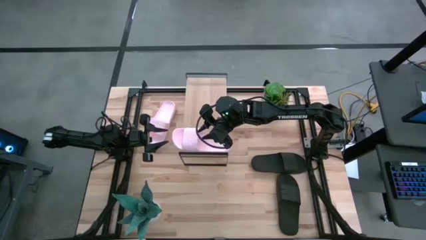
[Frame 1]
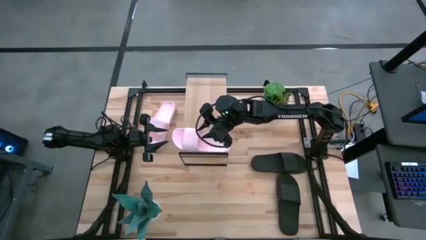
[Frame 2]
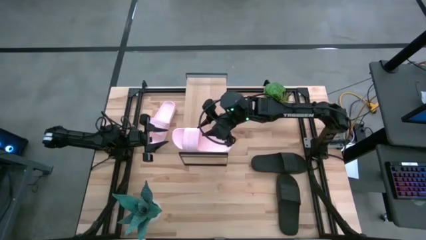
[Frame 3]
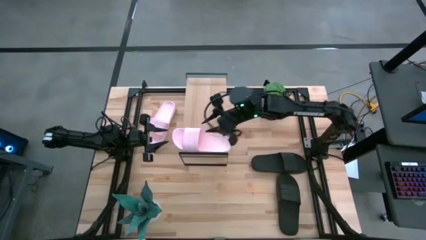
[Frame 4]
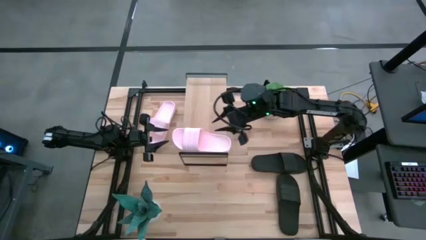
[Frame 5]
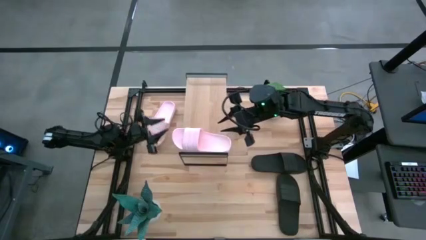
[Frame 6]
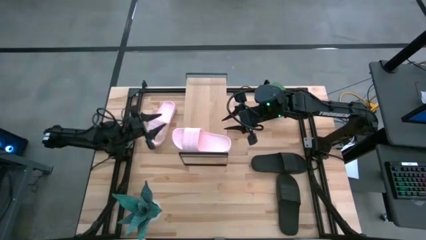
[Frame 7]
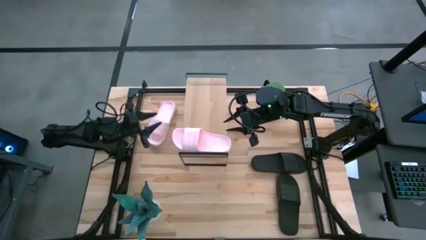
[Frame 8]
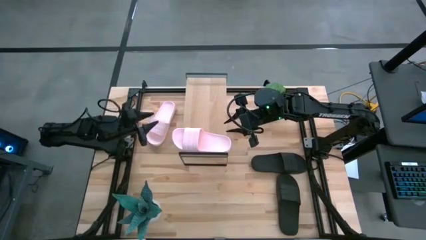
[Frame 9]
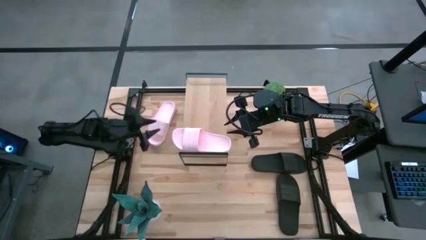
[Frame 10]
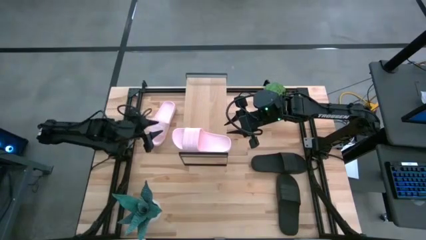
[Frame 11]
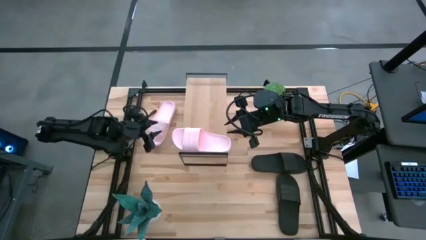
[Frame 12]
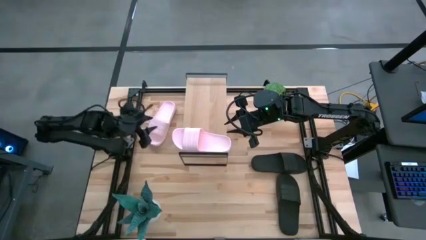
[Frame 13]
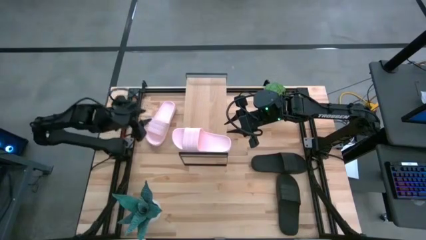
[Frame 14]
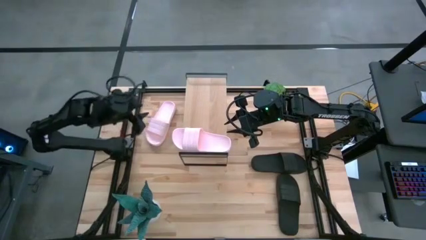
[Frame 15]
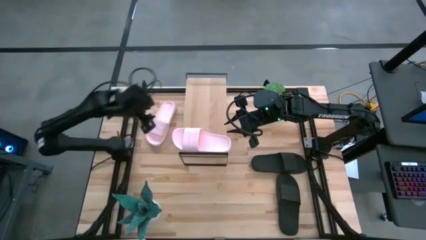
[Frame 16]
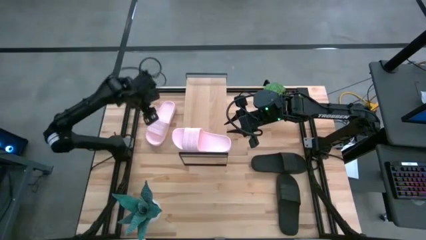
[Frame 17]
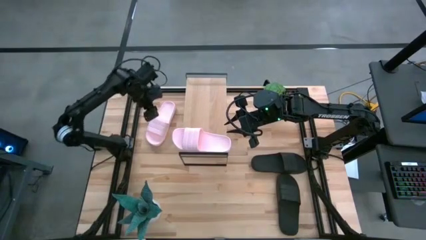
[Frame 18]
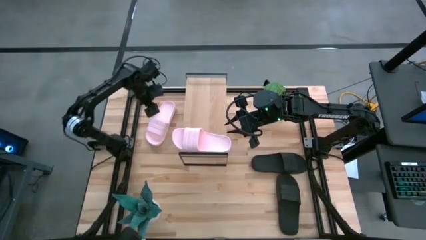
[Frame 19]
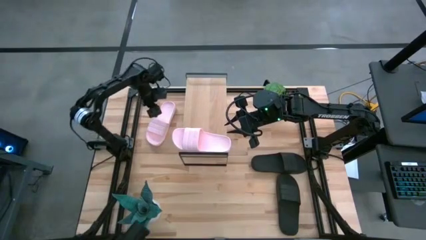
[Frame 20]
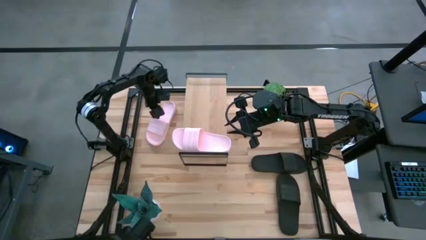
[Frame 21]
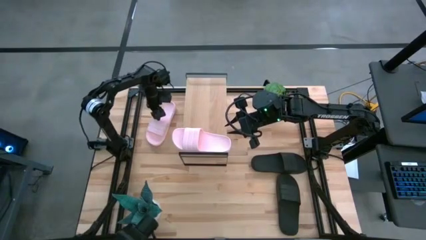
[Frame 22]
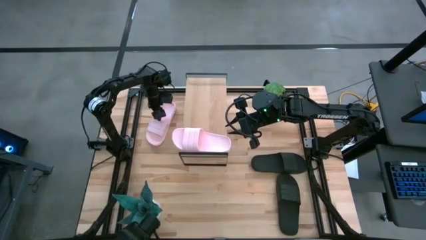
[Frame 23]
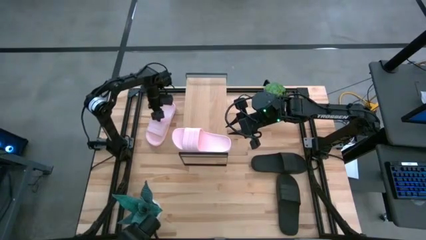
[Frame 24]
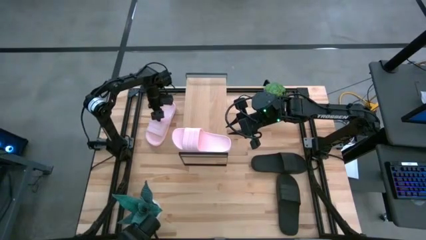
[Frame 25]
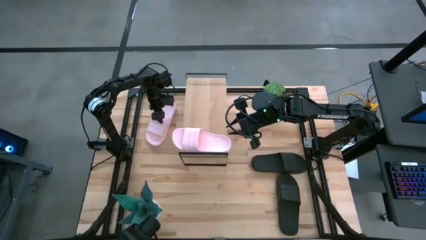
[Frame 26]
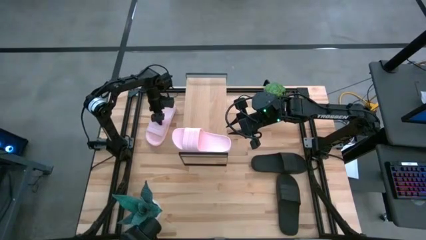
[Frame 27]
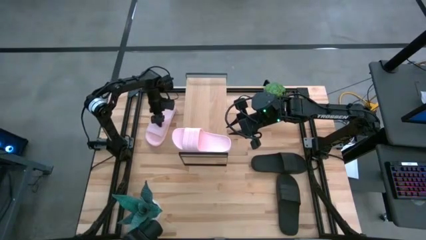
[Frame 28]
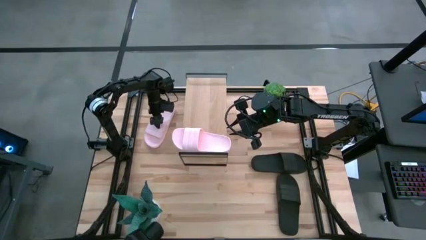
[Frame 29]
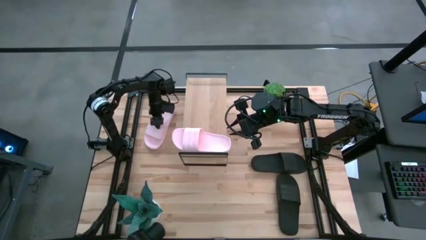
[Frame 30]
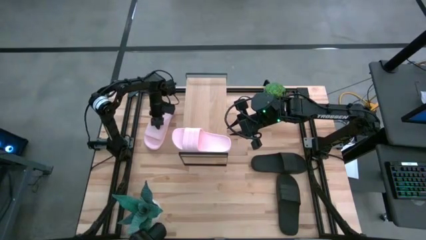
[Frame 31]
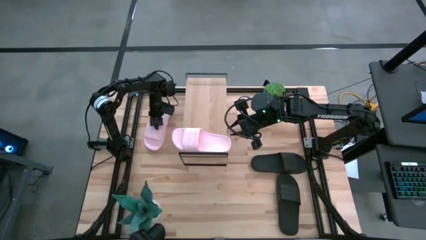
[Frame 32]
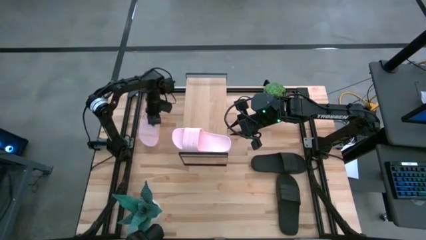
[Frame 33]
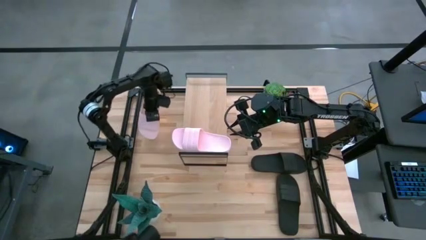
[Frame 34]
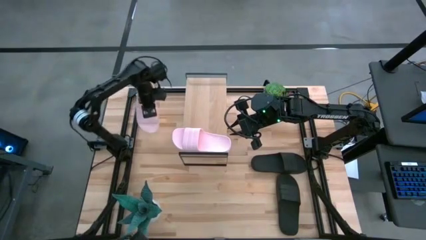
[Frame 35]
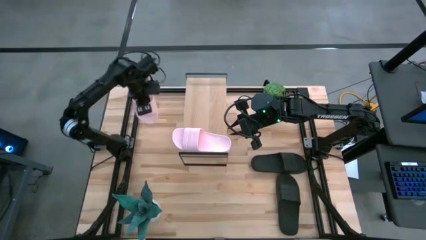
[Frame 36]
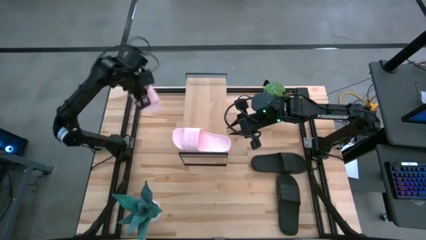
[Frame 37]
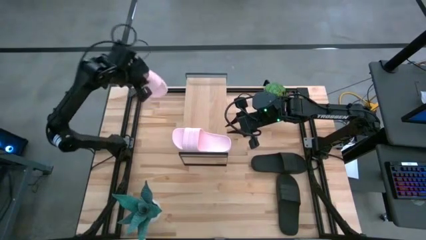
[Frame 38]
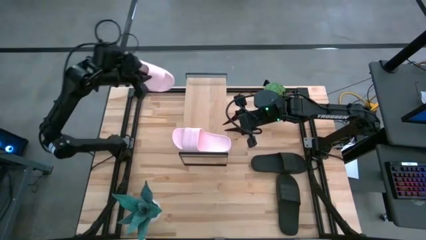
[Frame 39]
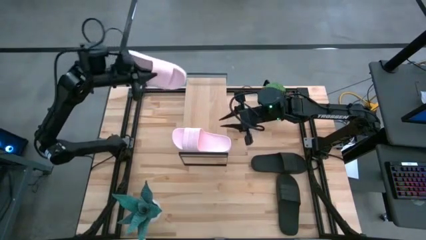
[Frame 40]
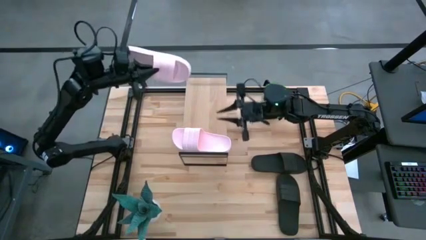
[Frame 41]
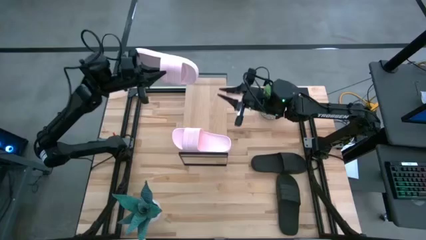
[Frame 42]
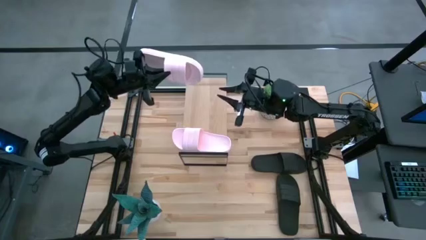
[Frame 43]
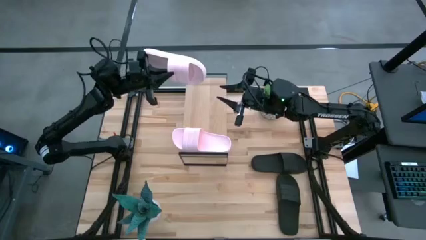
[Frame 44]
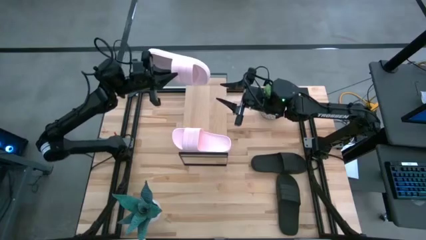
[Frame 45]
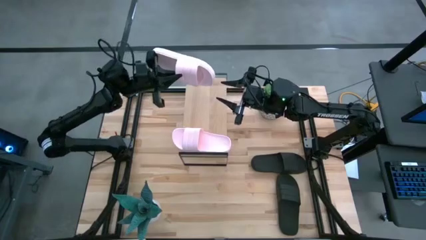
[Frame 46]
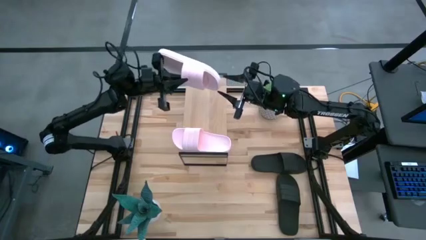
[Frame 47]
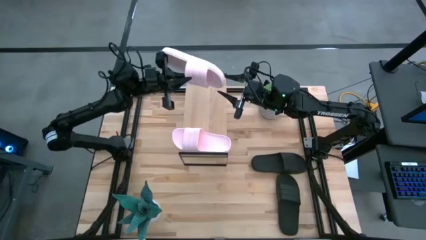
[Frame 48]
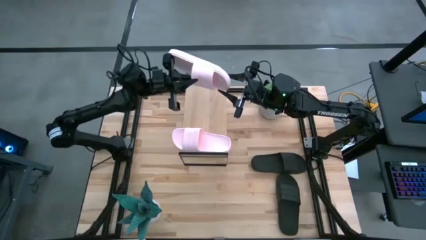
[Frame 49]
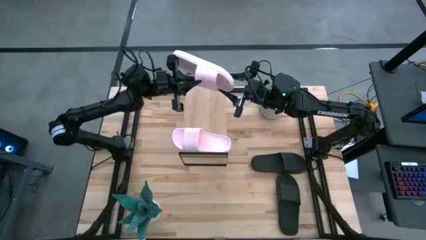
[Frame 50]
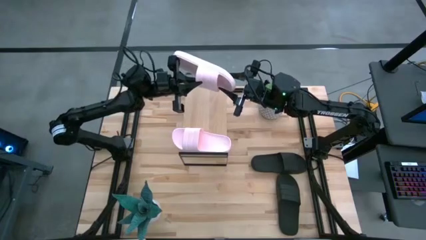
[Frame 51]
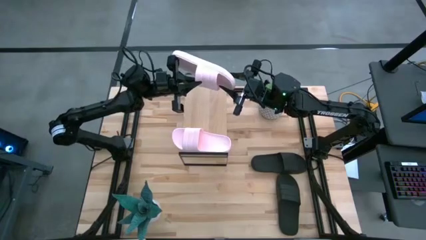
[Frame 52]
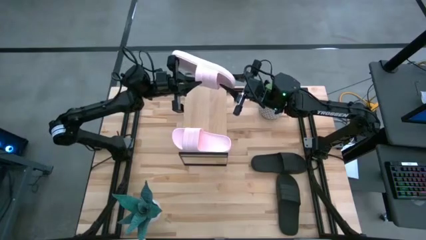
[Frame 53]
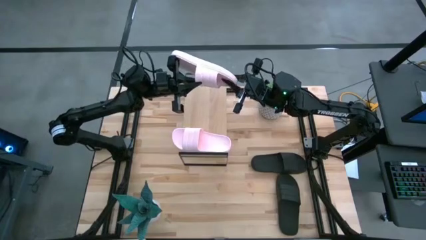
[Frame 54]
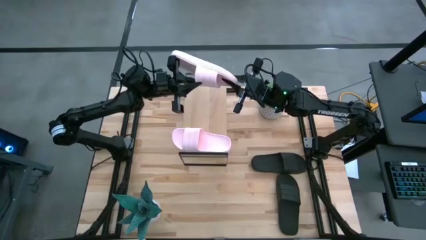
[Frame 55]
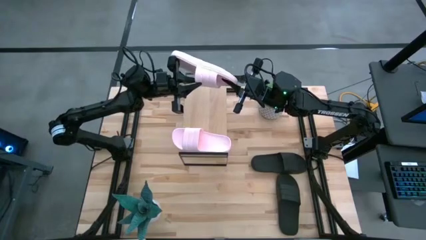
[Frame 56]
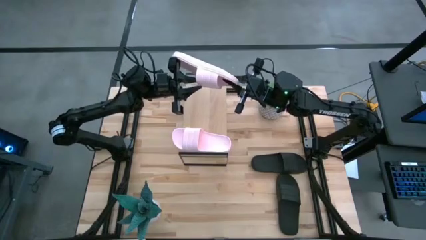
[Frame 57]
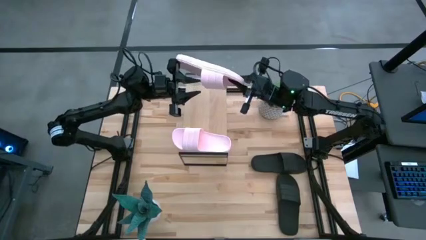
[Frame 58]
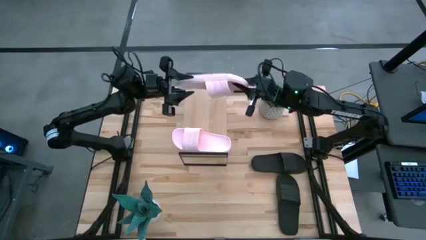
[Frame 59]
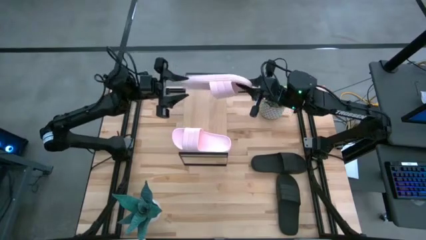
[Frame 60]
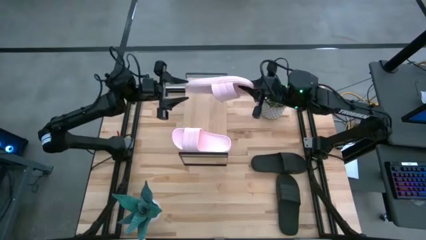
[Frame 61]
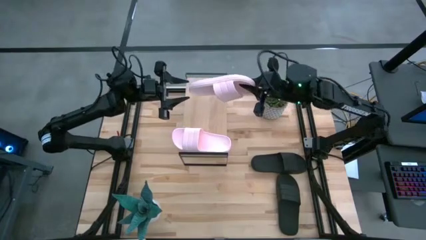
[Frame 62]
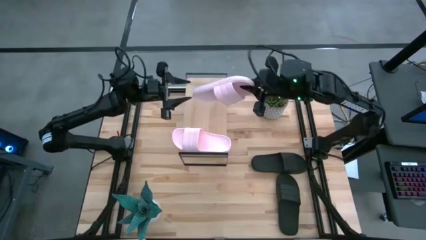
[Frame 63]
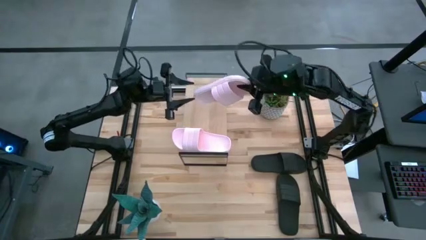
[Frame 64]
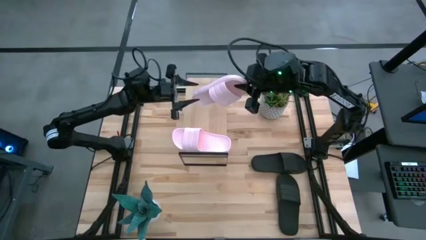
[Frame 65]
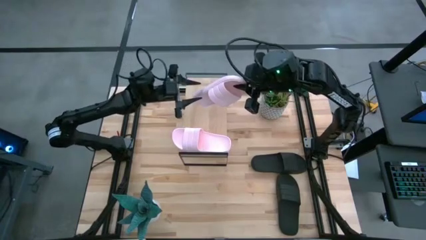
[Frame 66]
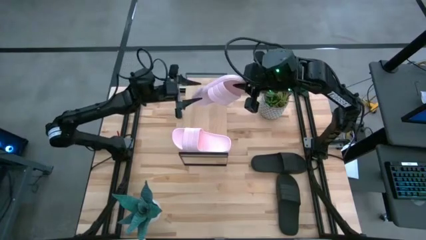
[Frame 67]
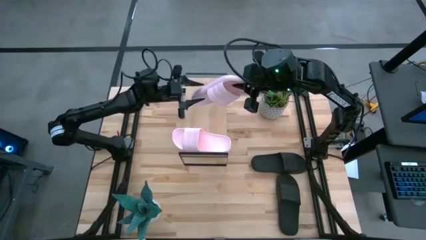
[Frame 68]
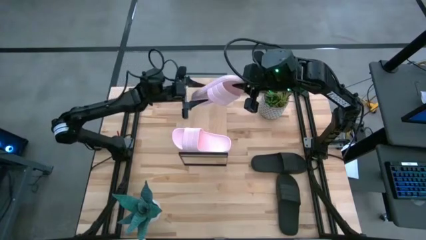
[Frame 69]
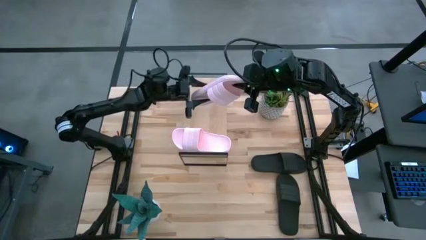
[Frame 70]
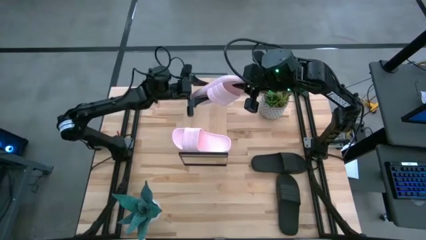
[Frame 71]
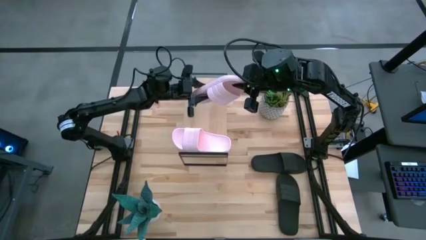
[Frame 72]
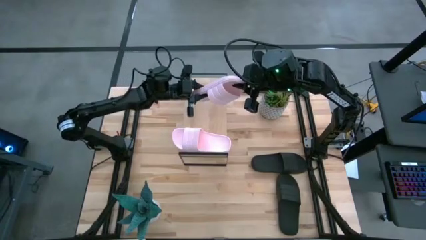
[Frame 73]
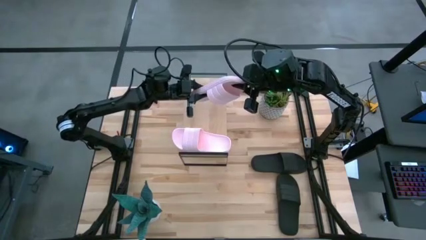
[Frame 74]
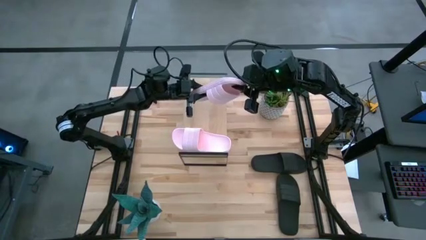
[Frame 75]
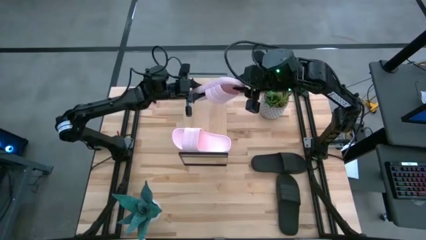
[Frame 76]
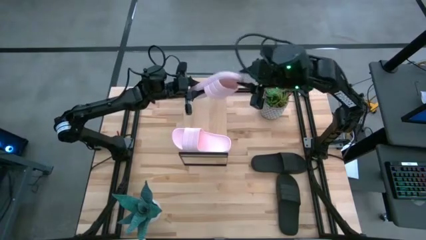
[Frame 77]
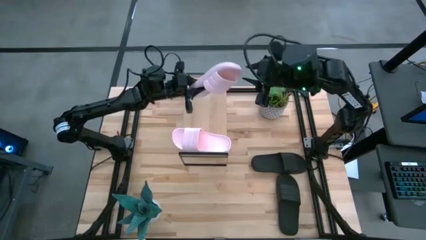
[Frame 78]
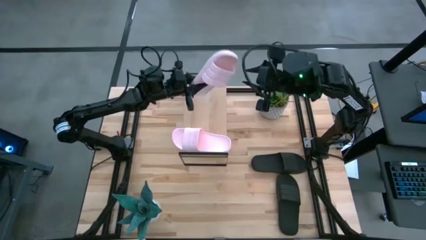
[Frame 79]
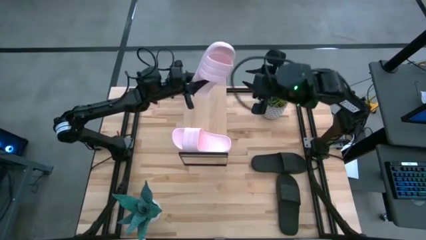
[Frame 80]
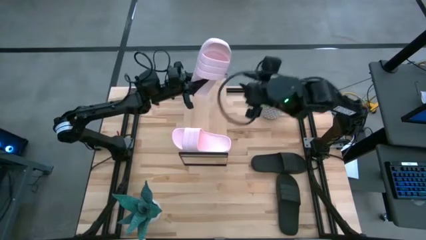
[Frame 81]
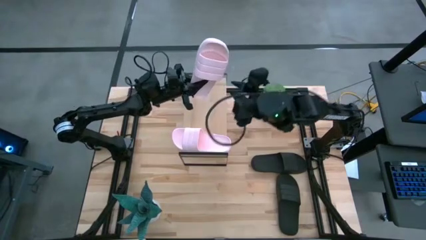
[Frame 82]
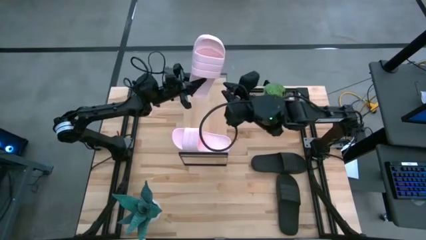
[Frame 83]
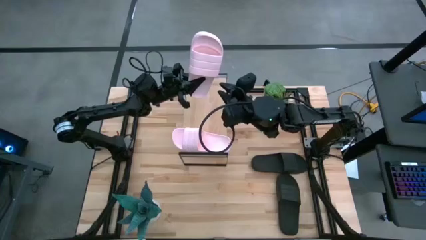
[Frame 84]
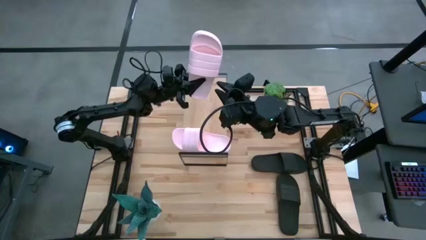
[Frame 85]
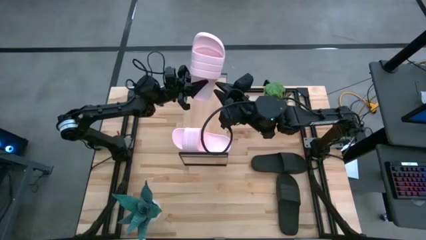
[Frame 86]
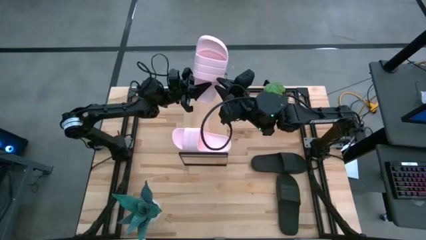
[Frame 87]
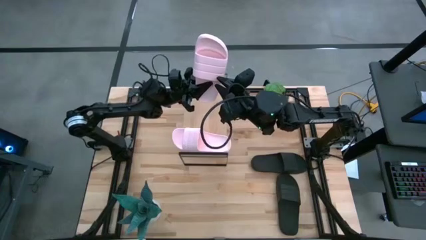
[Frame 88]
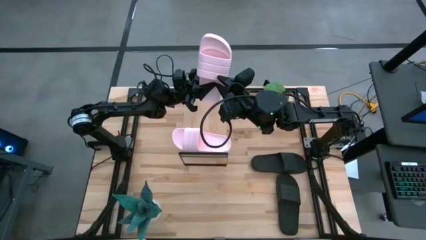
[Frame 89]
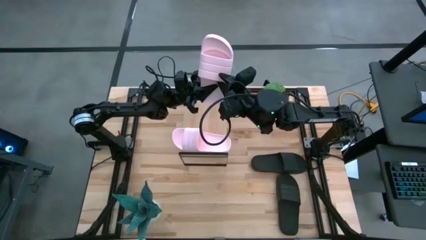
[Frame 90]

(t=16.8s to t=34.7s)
Task: Pick and place slides into the shelf
Put the pink slipper on the shelf
